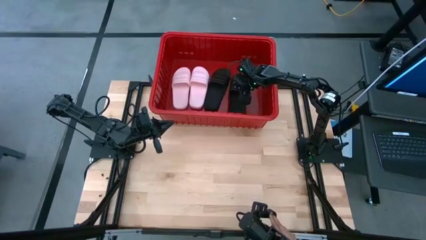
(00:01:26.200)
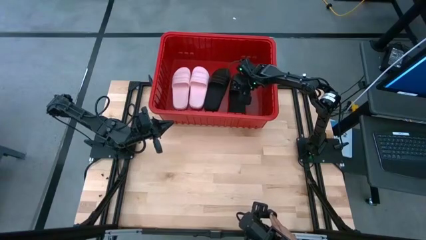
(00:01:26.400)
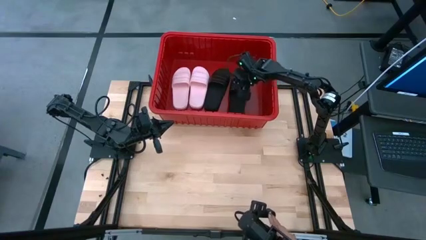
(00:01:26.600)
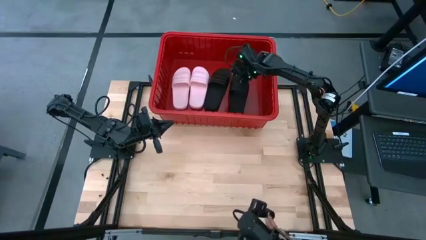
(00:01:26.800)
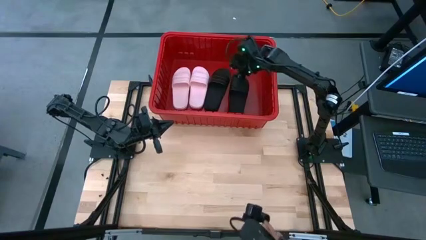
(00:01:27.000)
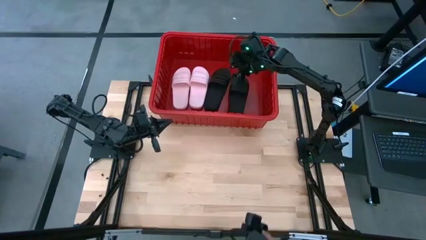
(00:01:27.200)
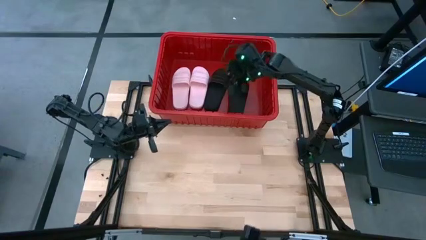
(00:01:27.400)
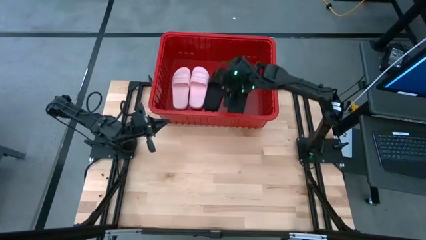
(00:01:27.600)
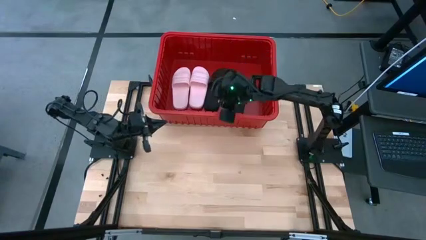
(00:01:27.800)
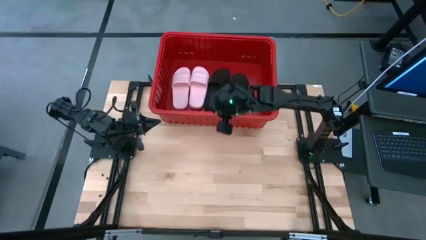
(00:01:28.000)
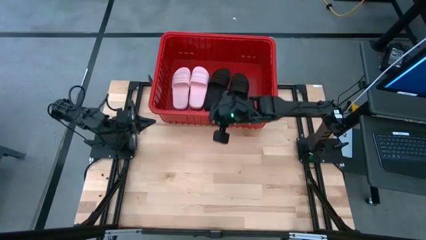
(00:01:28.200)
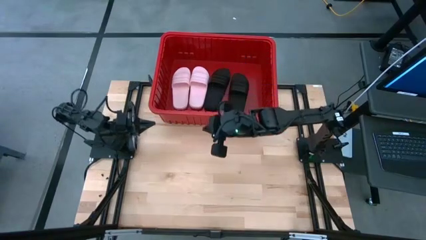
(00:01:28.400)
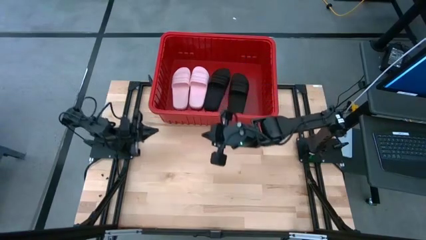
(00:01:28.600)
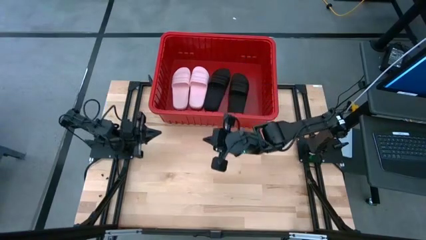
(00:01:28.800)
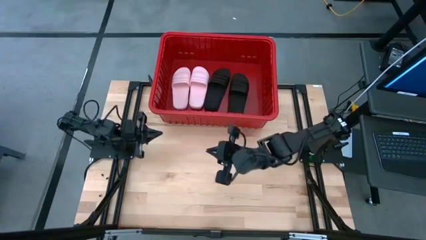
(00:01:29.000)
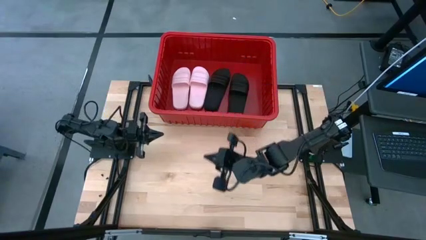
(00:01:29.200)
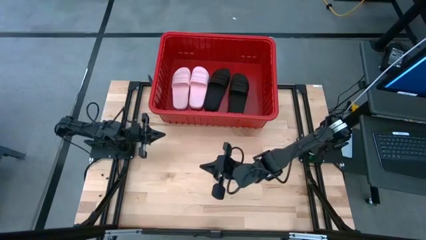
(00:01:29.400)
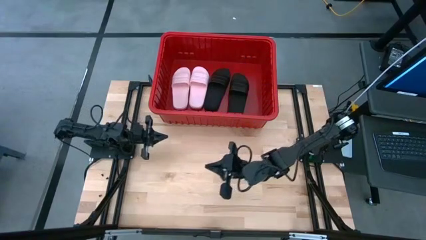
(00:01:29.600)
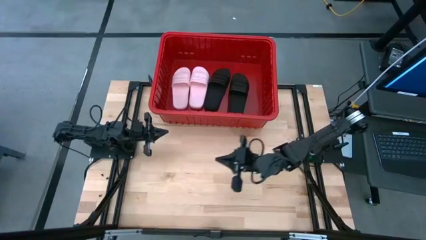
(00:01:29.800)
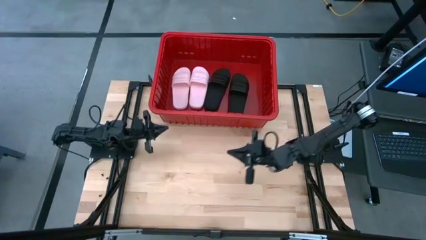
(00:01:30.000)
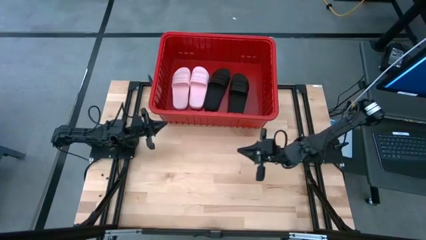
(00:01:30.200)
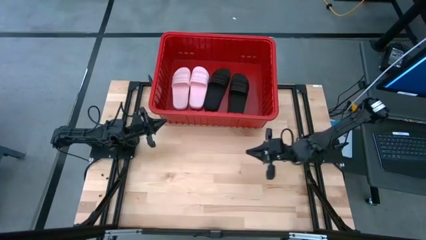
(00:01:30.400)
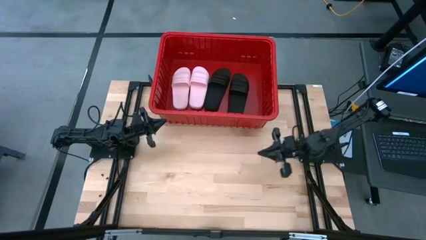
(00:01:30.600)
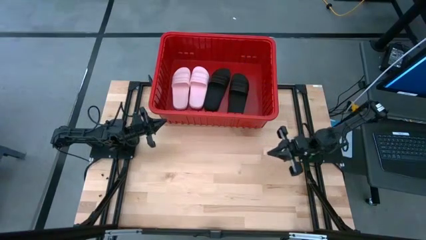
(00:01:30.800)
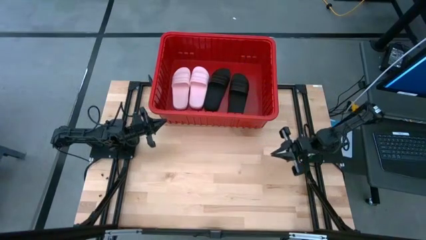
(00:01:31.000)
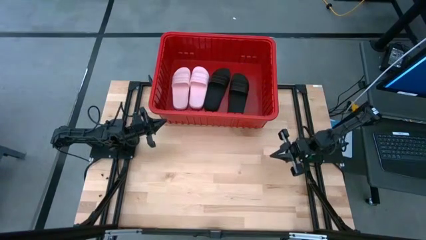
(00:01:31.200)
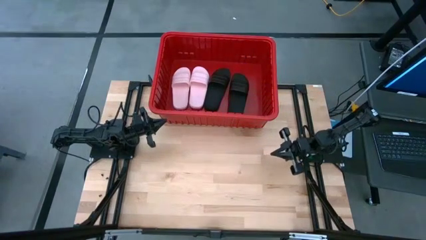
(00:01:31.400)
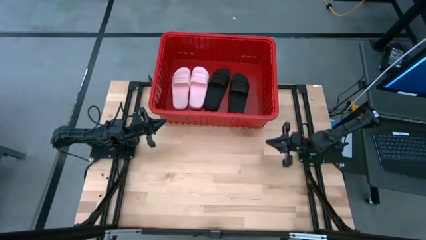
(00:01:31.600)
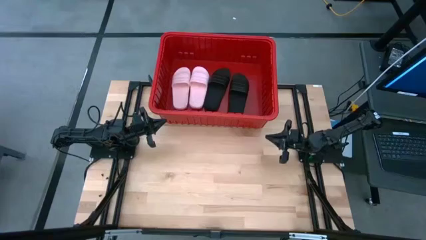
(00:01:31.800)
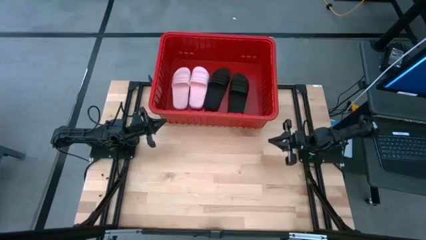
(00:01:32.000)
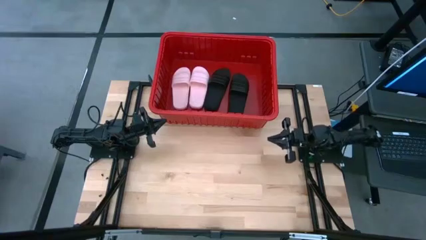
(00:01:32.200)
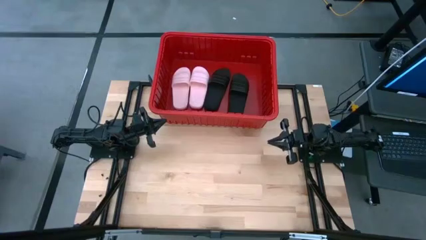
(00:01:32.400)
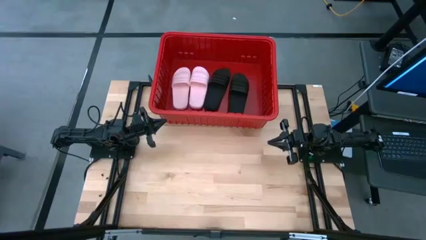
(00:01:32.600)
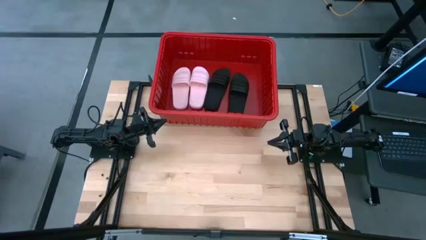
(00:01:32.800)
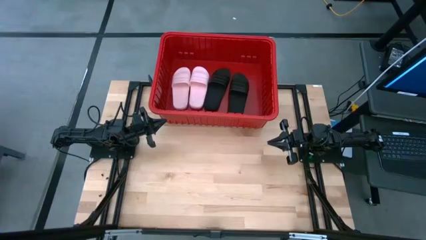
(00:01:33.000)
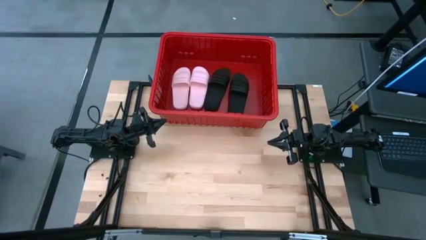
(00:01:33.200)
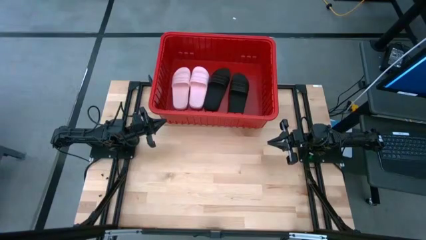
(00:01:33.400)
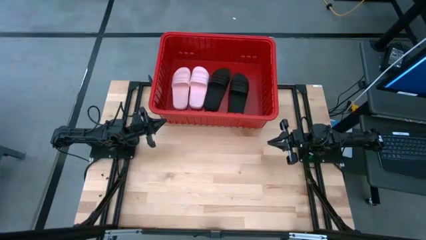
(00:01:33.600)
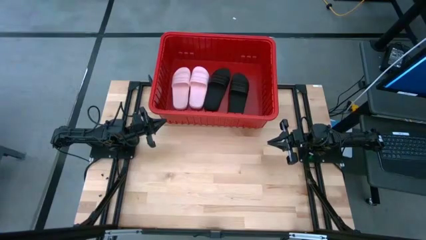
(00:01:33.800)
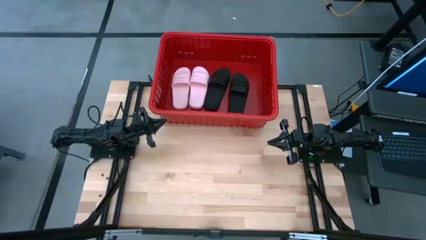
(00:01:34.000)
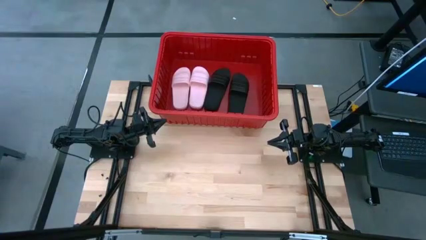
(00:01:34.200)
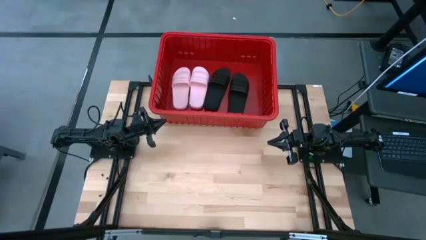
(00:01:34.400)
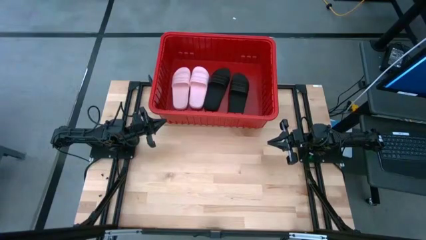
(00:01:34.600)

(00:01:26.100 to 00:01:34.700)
Task: Pick and place slides into bin
Return to Home Position

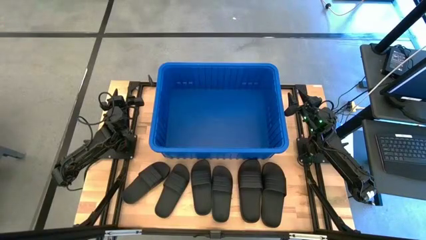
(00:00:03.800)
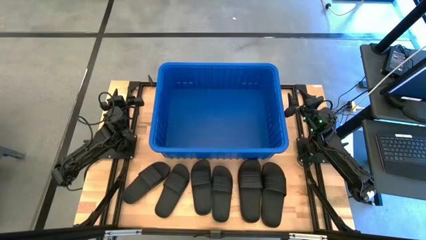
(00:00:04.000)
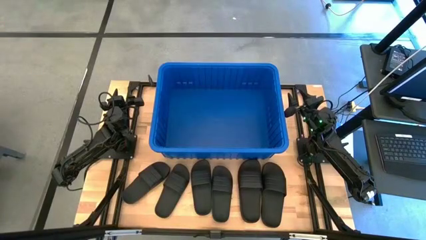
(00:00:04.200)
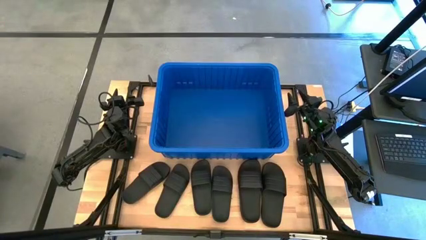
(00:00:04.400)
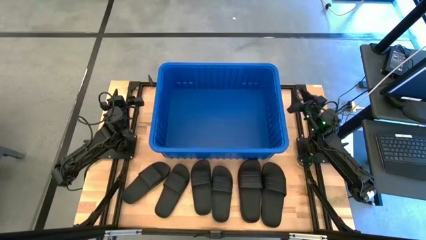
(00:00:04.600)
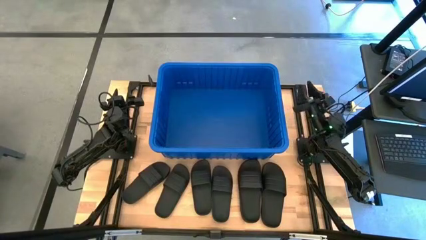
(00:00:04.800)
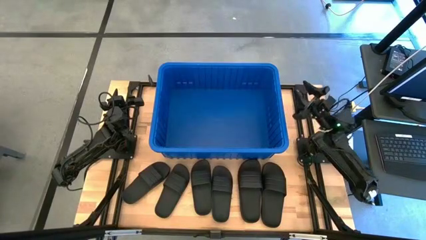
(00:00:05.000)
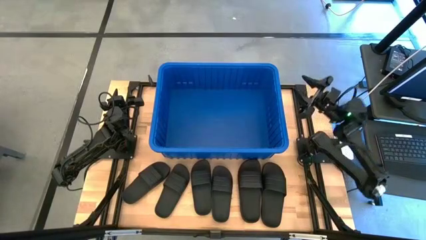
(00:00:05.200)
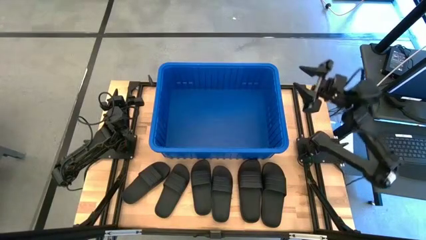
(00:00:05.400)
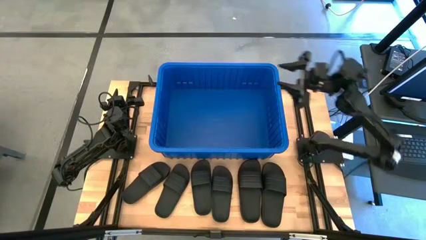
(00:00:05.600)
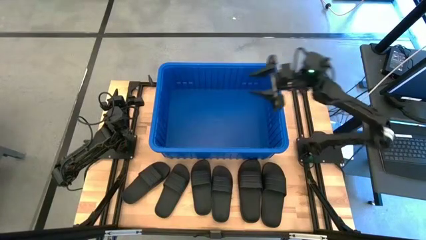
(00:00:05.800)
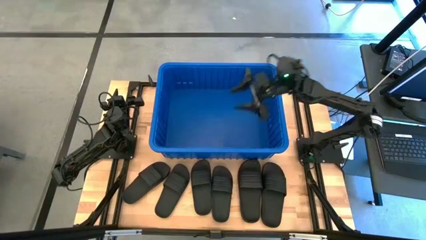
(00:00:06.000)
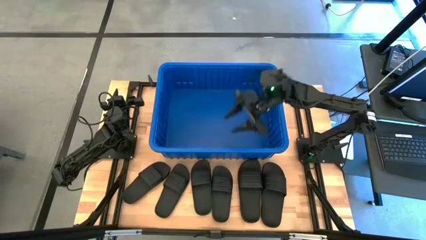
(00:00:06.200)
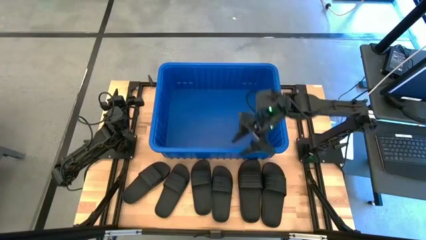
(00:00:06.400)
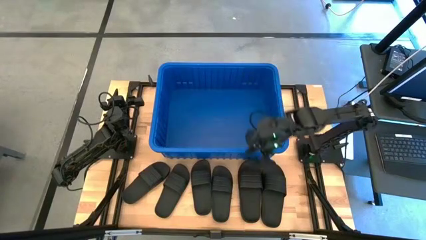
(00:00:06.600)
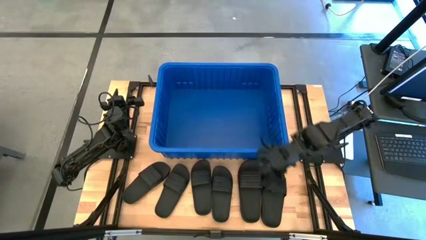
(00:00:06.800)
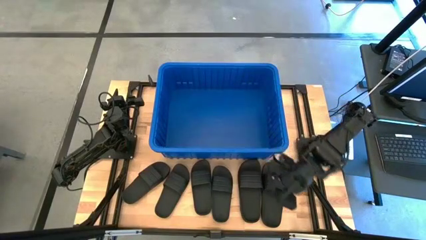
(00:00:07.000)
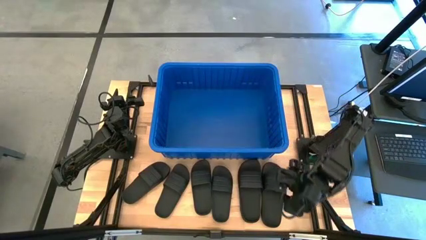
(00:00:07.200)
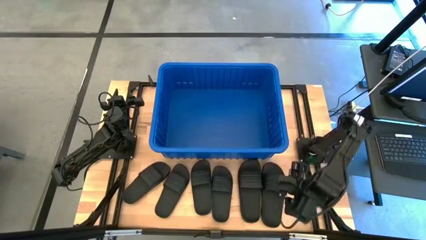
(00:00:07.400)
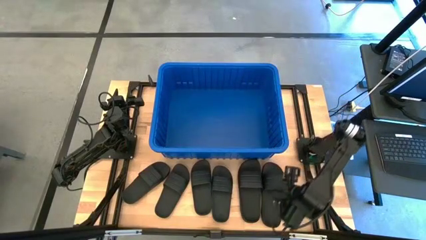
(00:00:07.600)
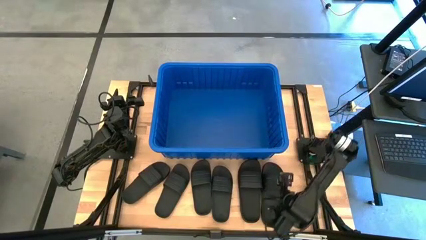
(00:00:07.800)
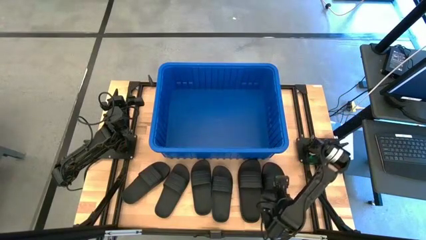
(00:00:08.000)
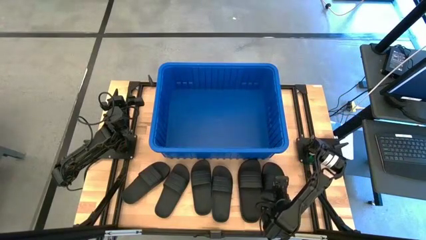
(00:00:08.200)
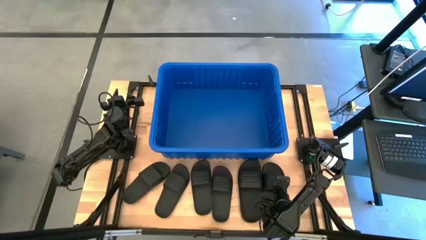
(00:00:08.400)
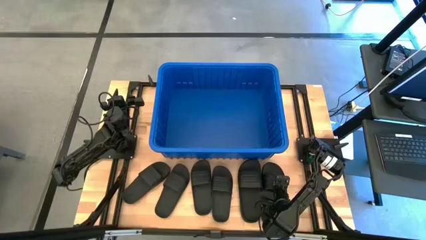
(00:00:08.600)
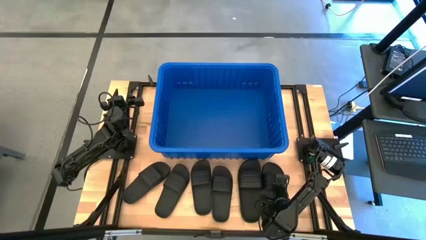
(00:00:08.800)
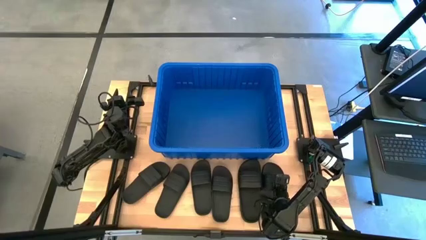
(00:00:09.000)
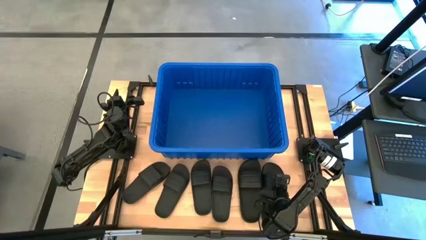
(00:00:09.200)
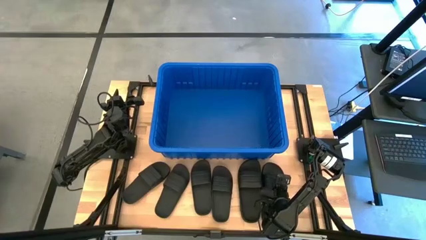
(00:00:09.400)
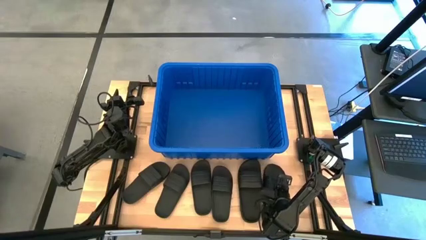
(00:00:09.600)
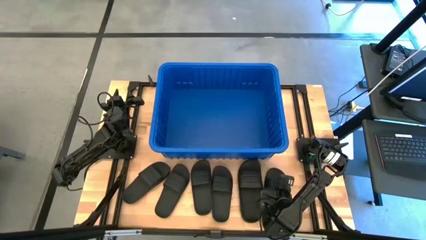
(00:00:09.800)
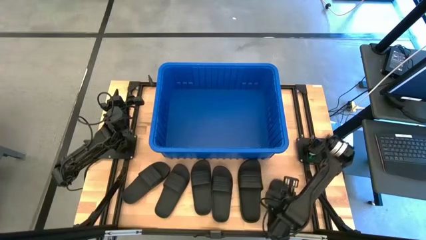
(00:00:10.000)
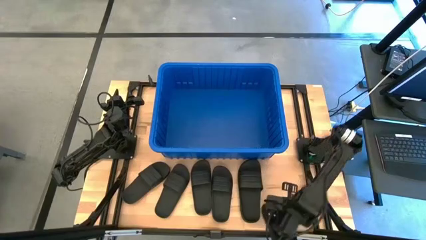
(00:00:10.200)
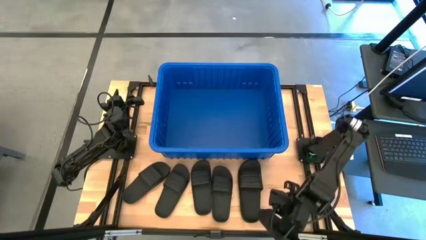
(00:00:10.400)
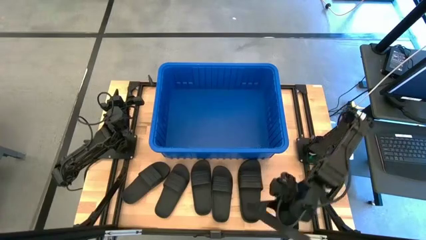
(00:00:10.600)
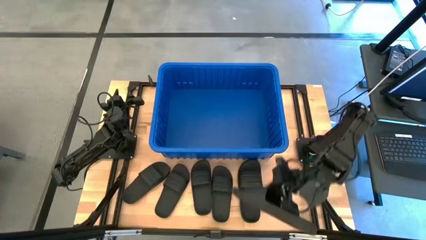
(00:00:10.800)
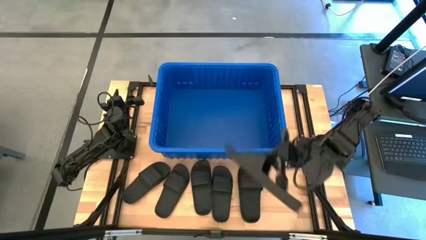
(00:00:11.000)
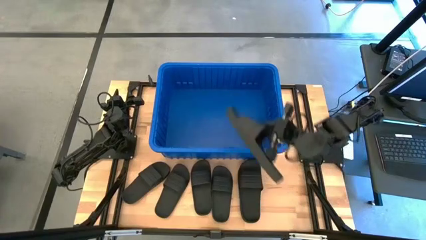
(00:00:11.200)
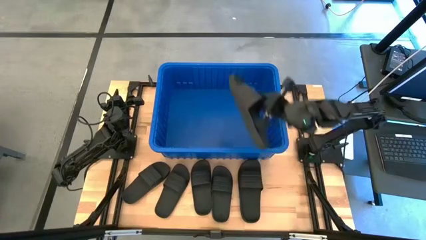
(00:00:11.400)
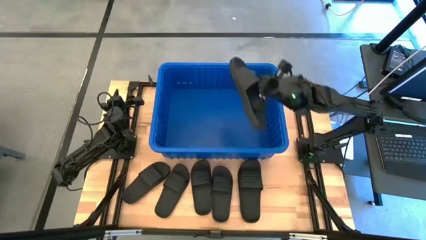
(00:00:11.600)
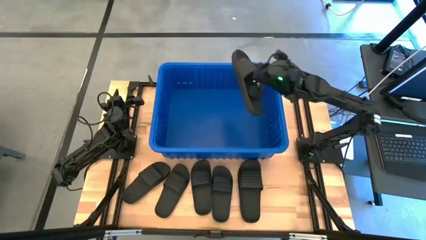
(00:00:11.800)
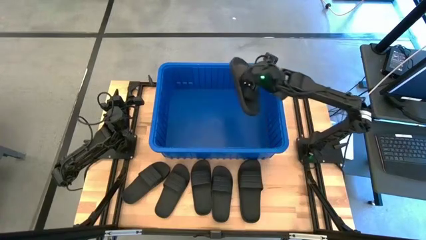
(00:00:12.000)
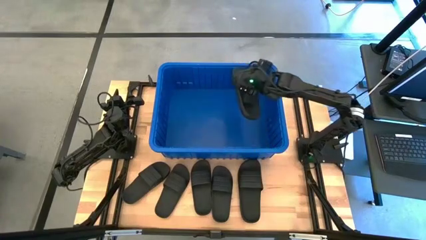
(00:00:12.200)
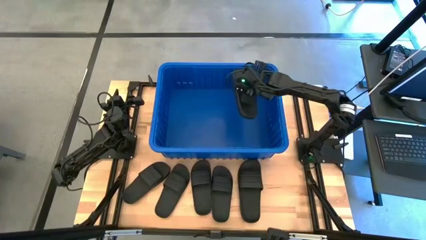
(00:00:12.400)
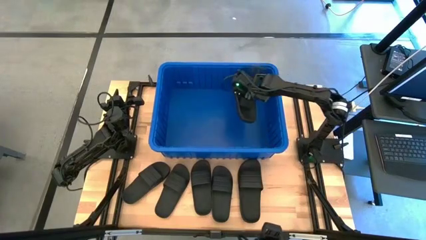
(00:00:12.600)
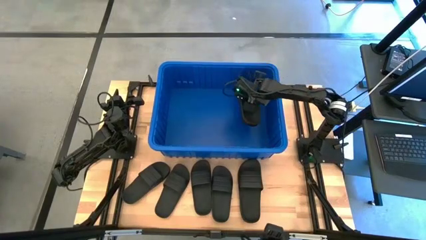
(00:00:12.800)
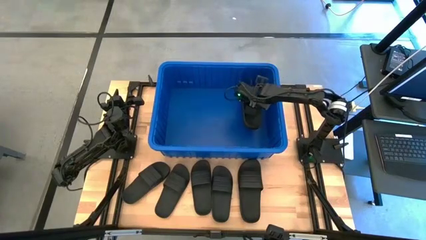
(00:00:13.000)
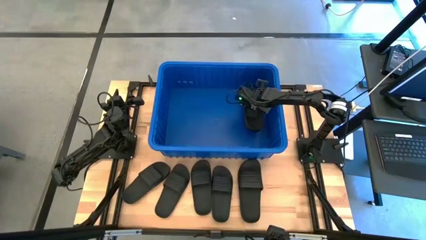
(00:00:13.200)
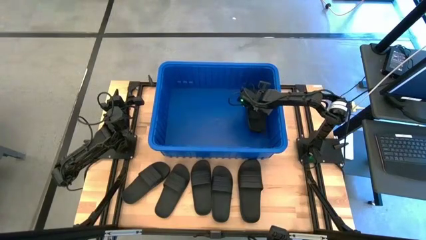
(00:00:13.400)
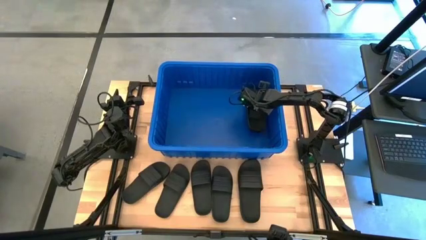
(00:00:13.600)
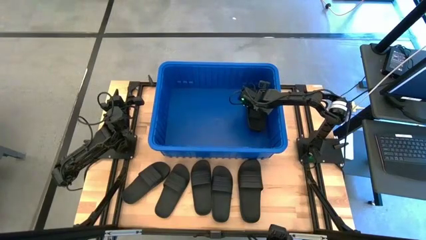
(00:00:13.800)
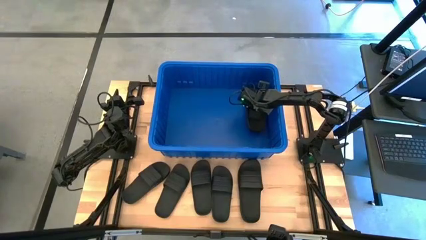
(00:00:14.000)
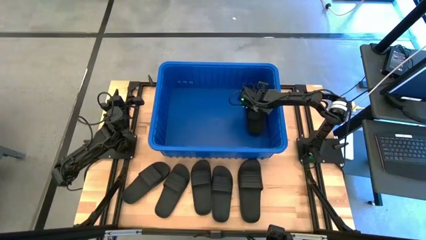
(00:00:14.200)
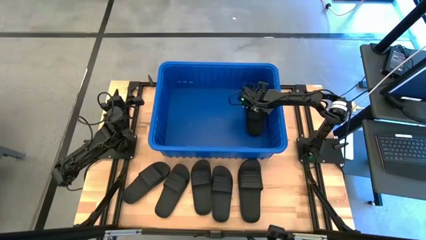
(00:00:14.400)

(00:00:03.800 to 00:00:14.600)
Task: Pick and place slides into bin
Put the black slide into the blue bin
